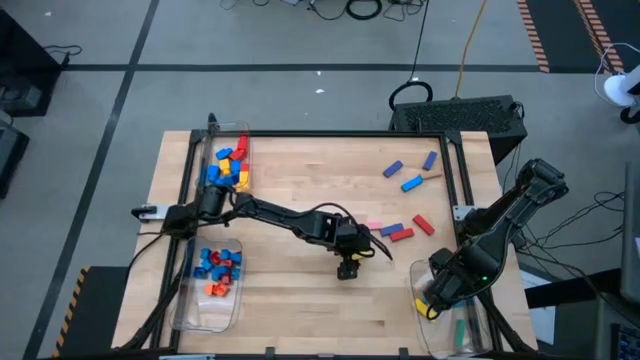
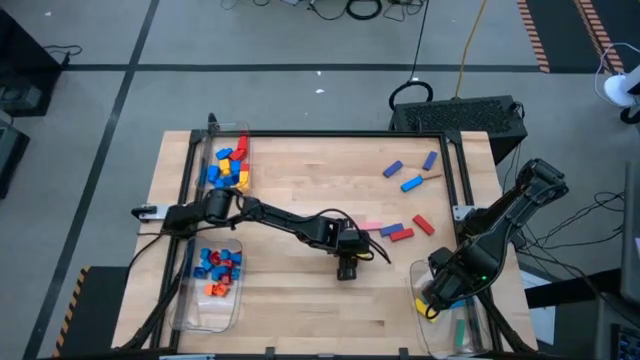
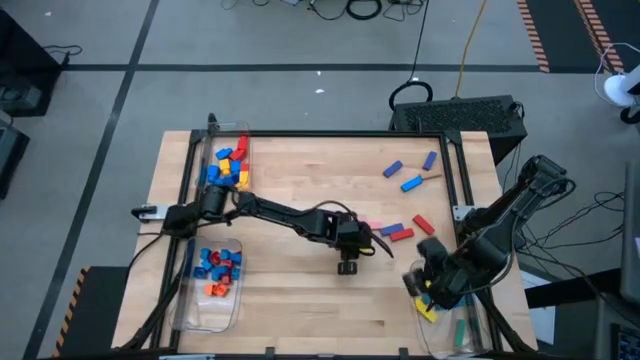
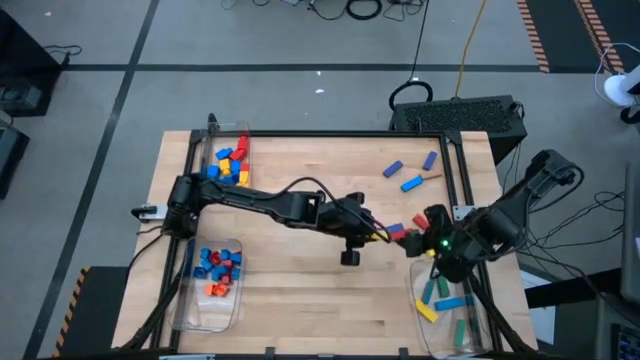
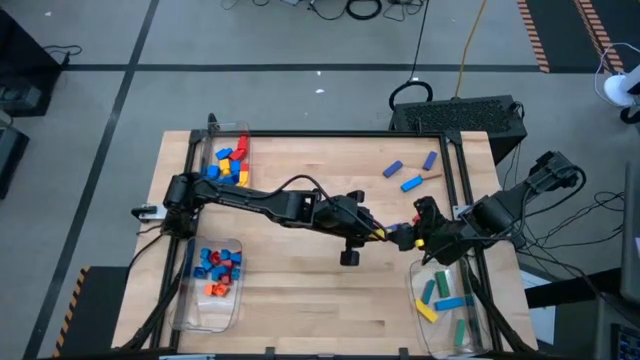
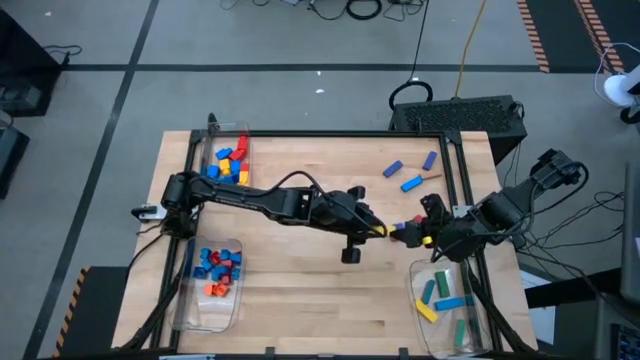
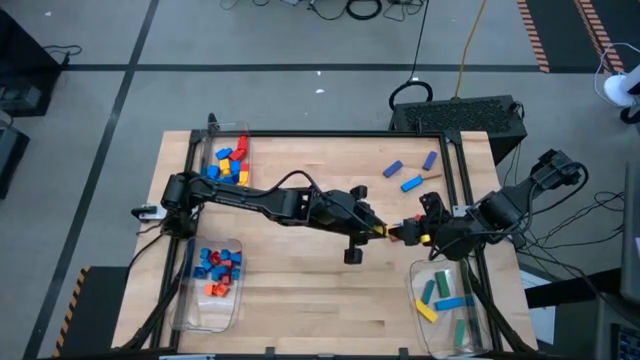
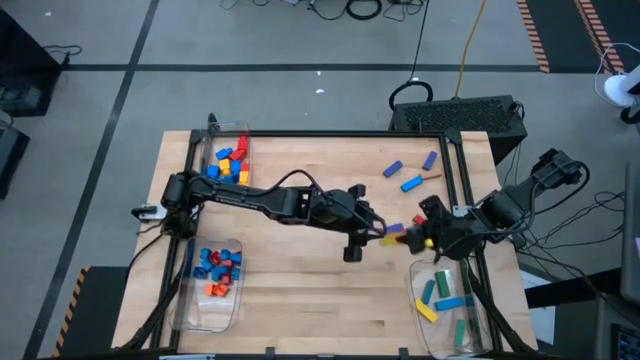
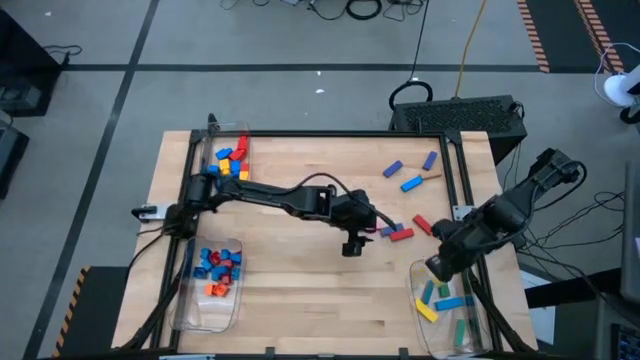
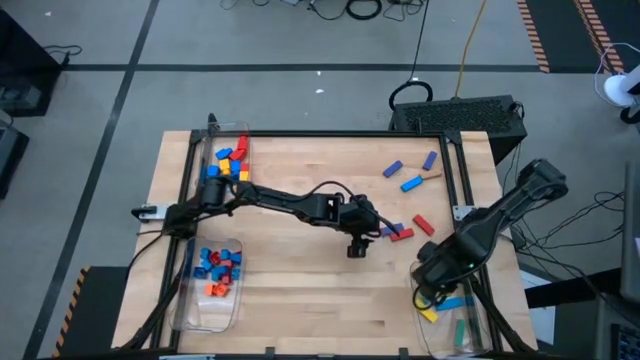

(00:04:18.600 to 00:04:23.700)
Task: Sort blocks by size
Put the yellow rectangular block into the bottom right transparent bin

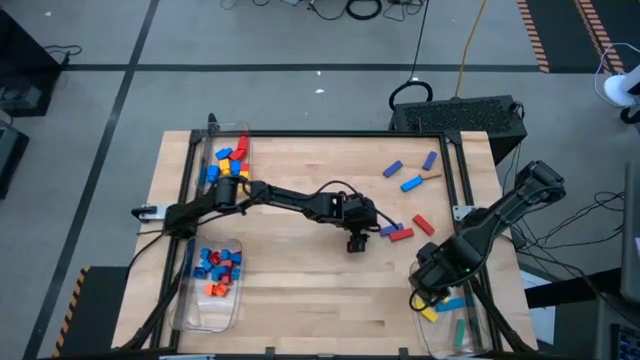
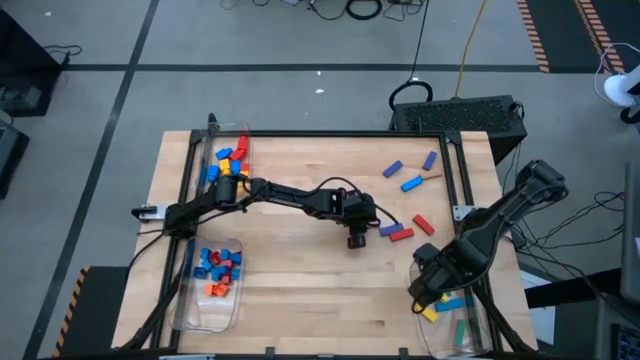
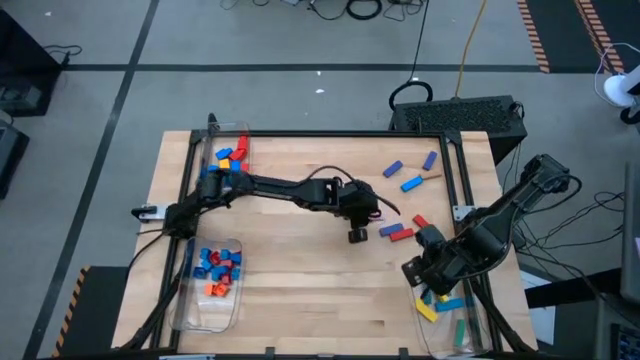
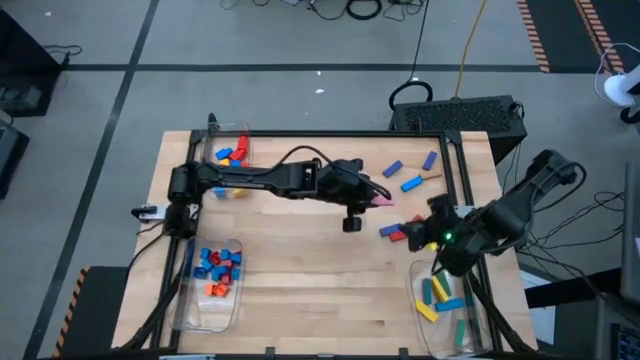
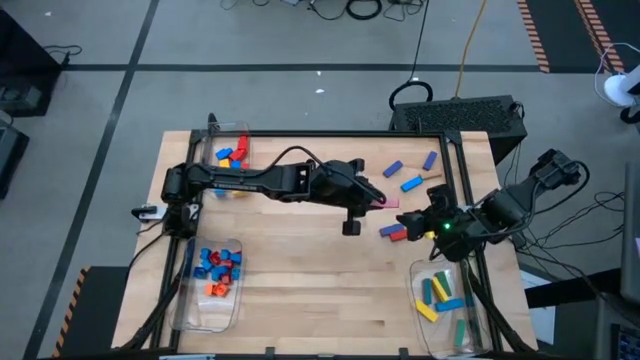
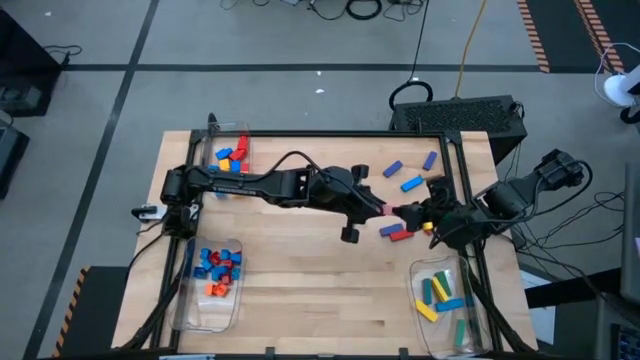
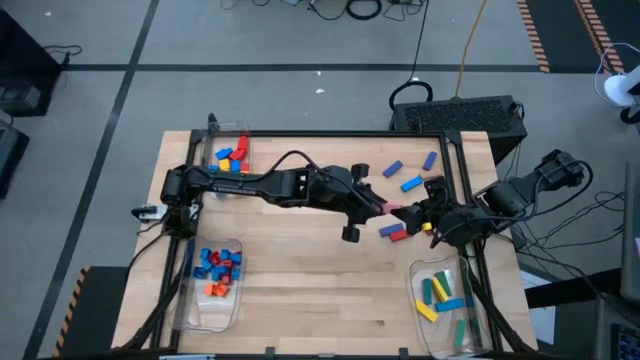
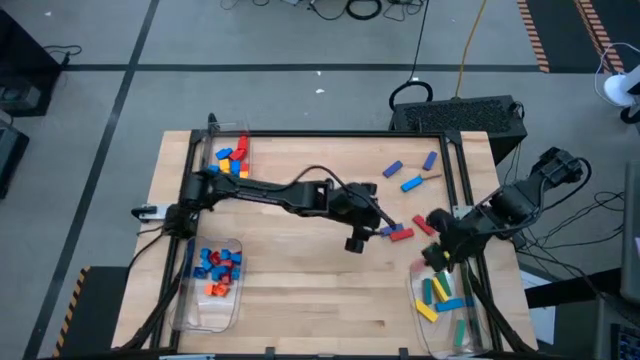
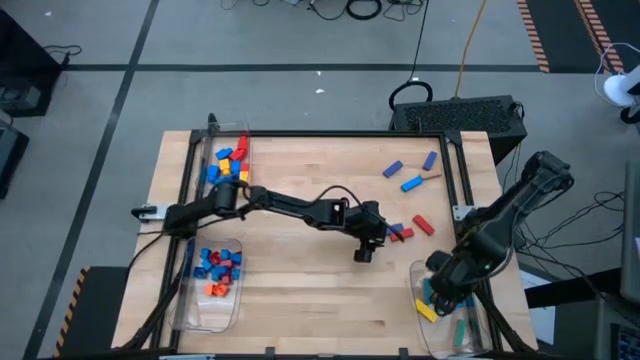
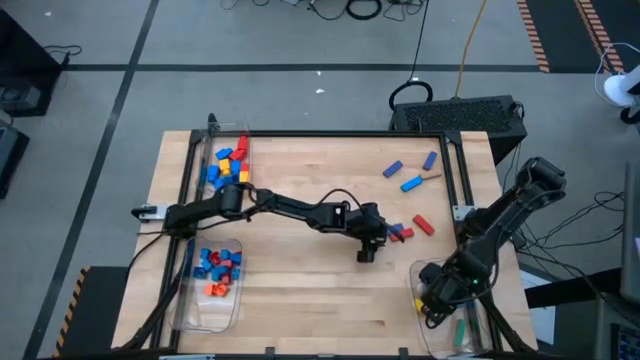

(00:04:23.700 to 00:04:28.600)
Put the pink rectangular block into the bottom right transparent bin

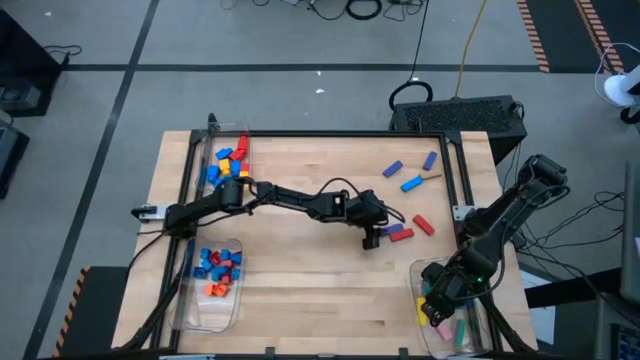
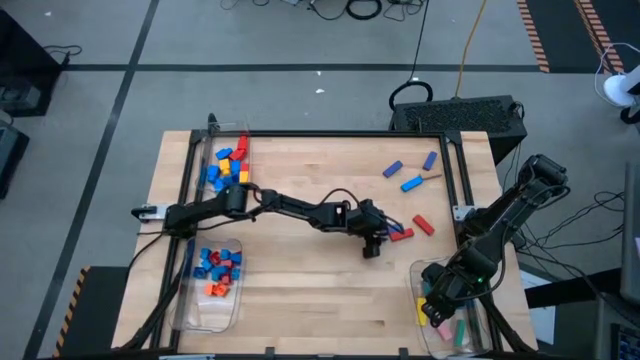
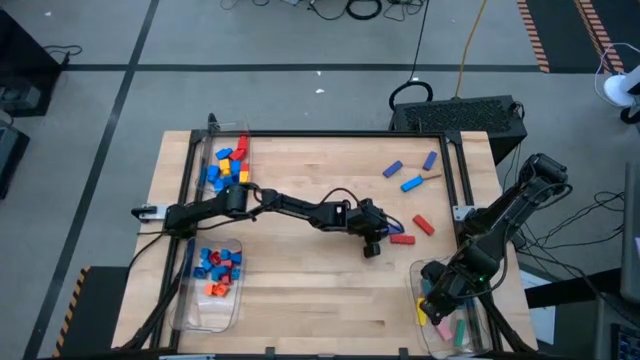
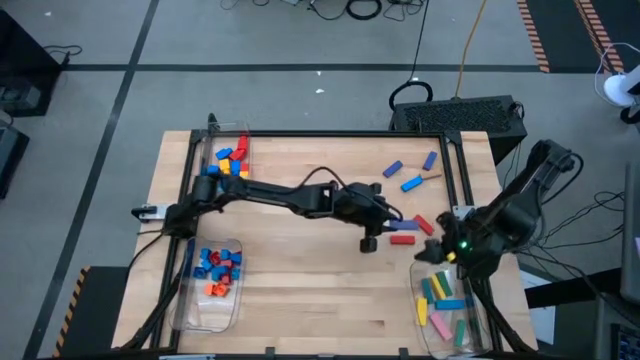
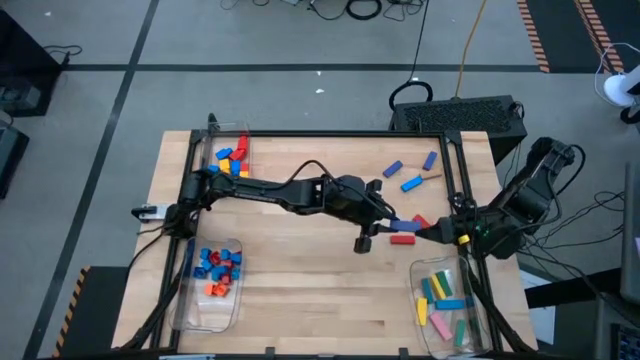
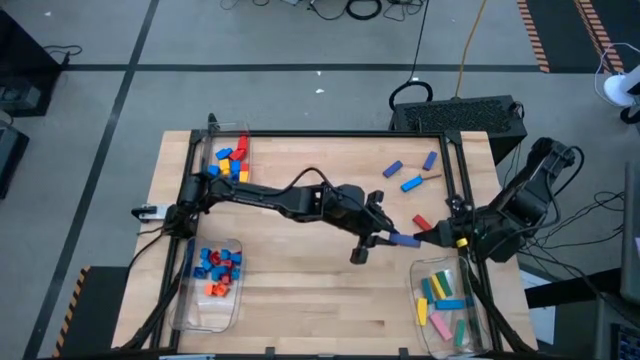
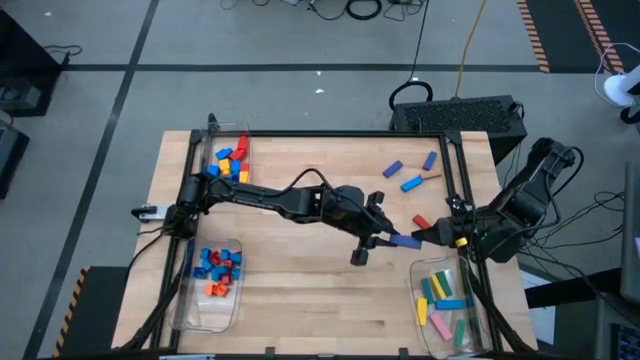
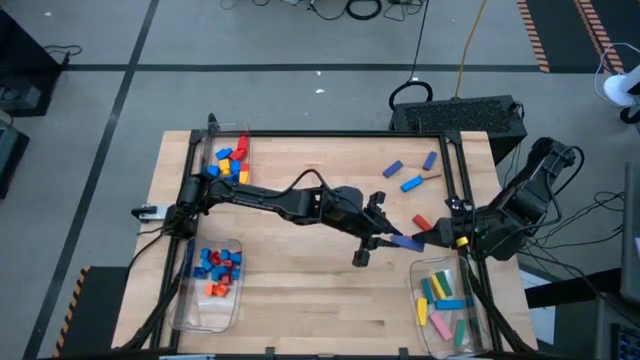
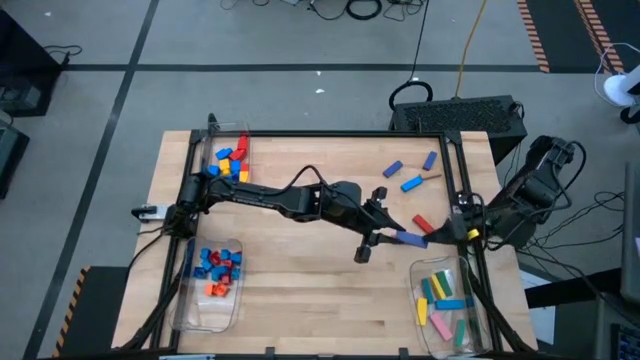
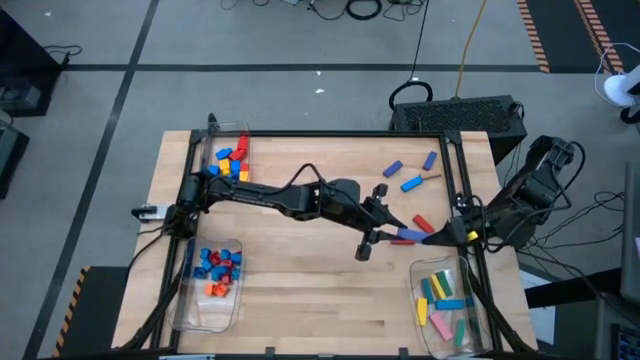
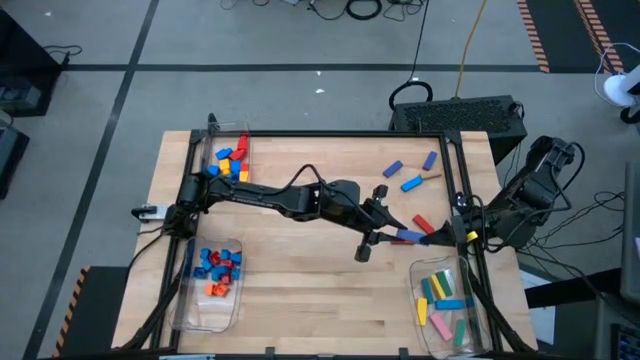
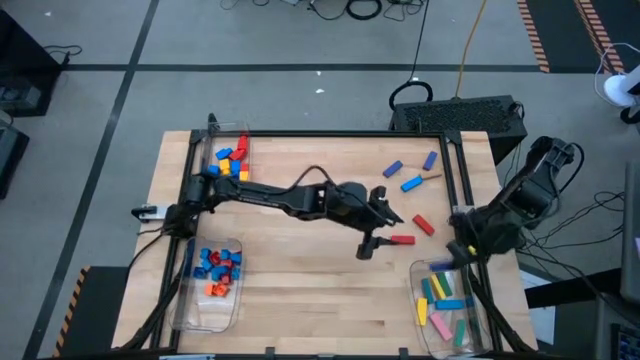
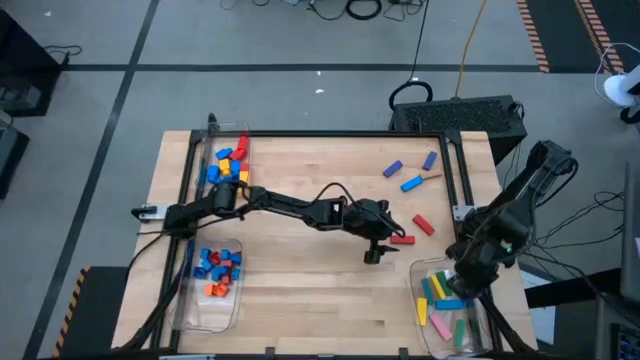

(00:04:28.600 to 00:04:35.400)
Put the blue rectangular block into the bottom right transparent bin

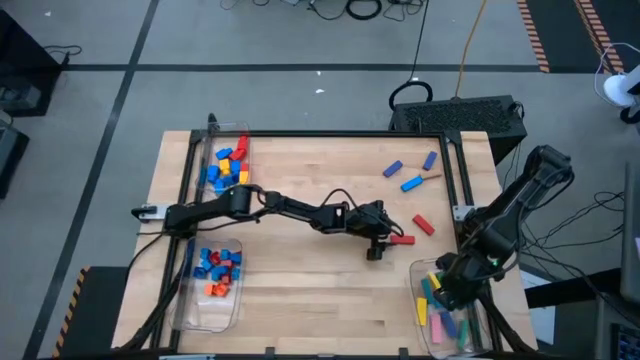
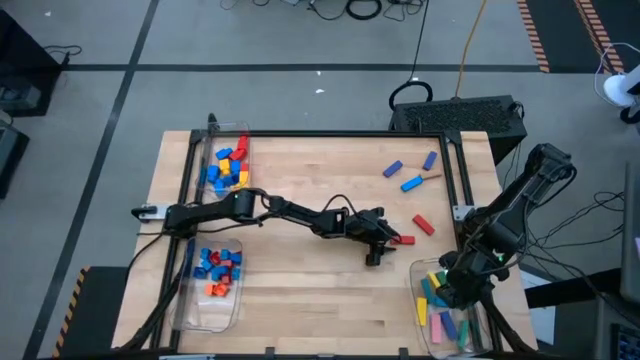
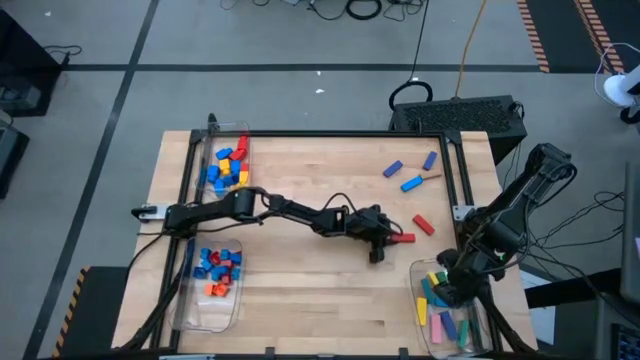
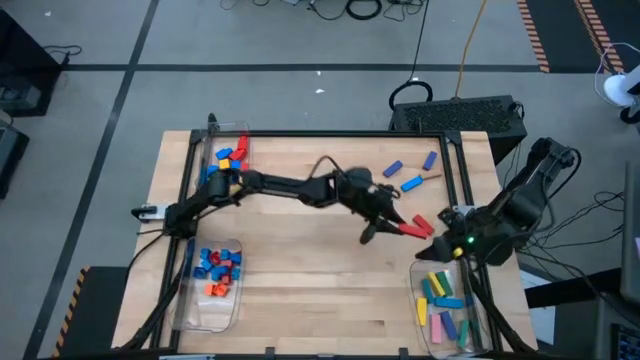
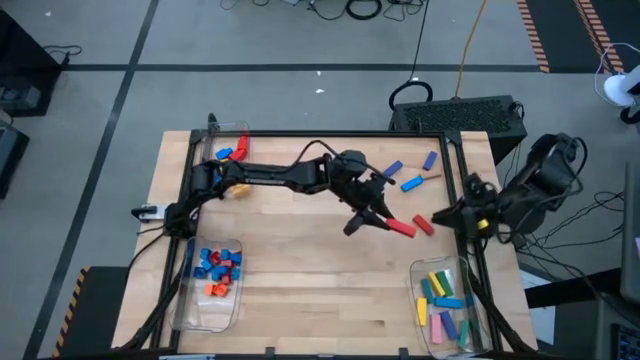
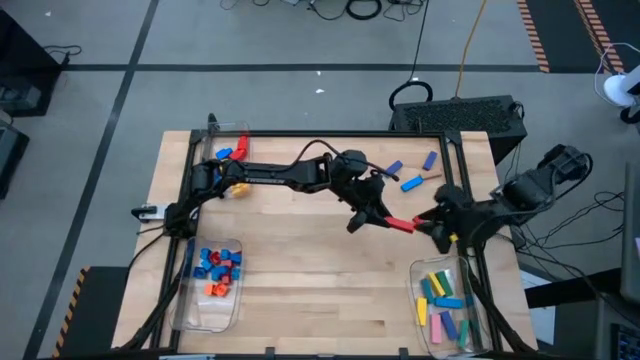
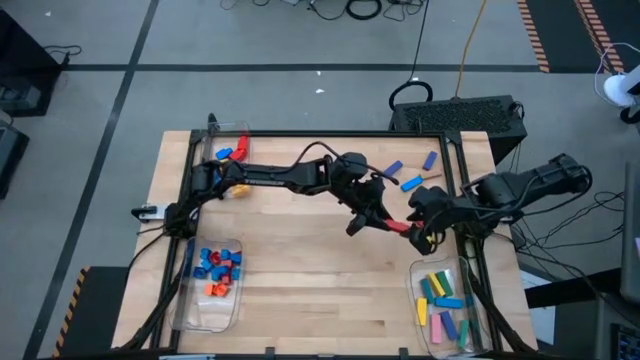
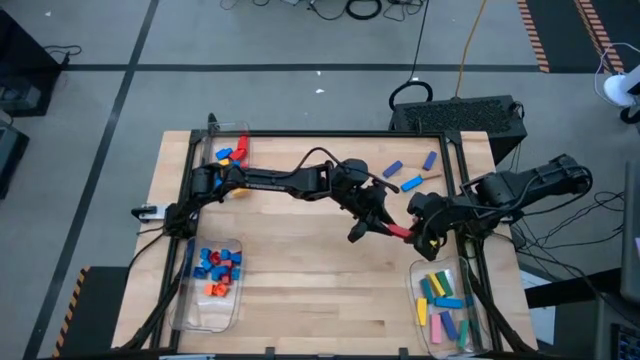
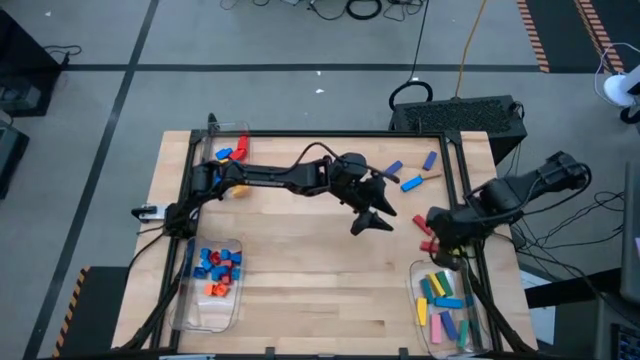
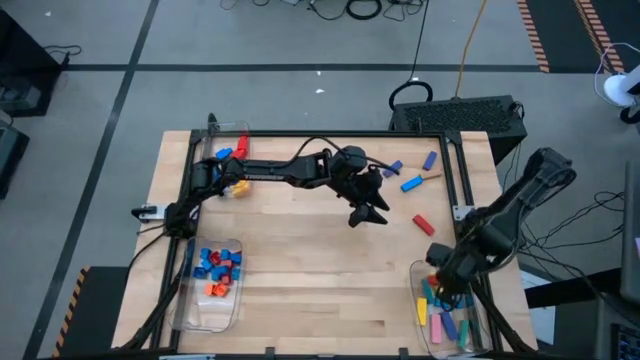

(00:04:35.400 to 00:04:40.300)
Put the red rectangular block into the bottom right transparent bin
